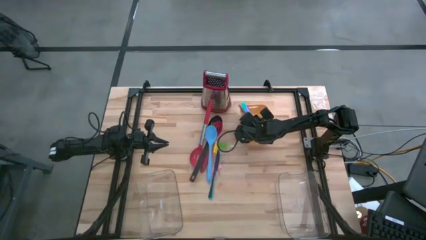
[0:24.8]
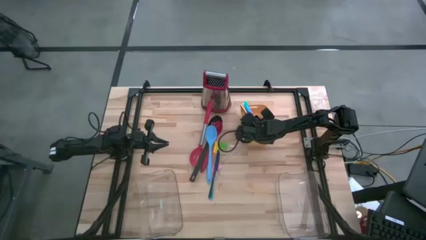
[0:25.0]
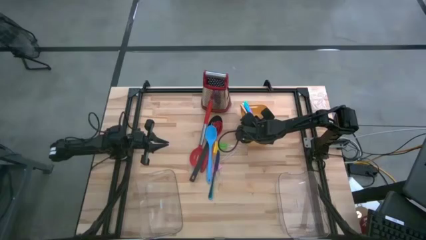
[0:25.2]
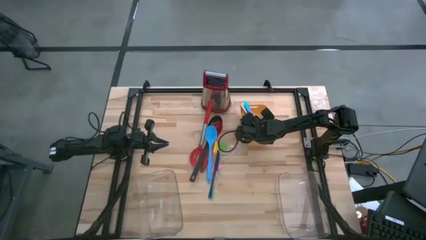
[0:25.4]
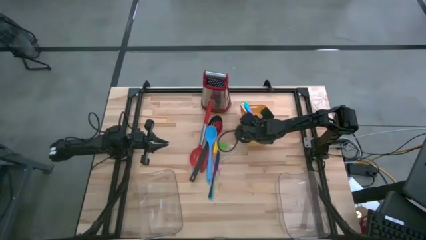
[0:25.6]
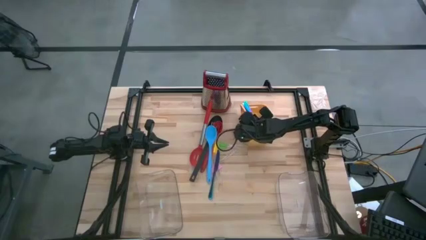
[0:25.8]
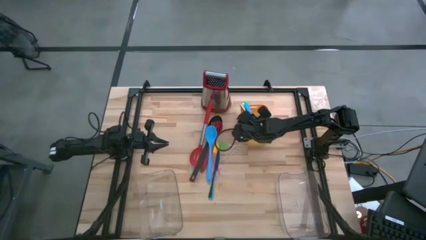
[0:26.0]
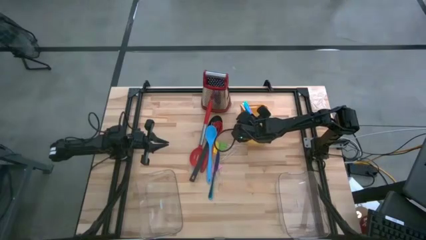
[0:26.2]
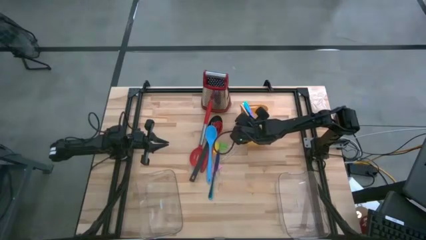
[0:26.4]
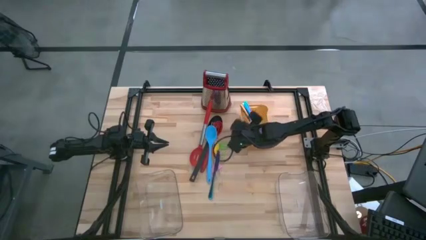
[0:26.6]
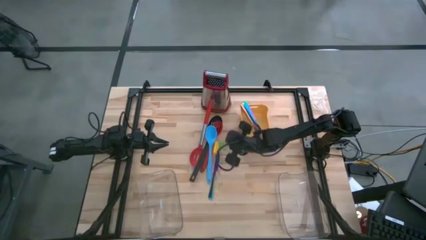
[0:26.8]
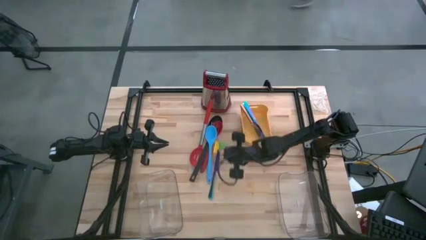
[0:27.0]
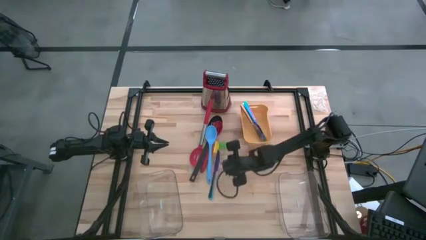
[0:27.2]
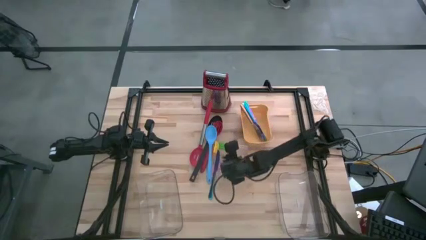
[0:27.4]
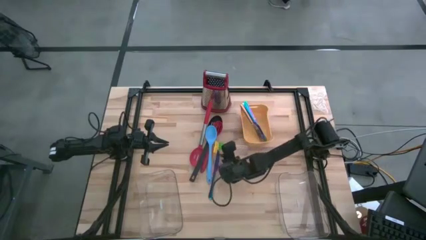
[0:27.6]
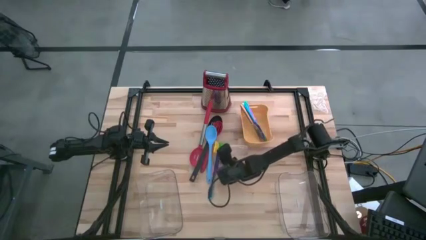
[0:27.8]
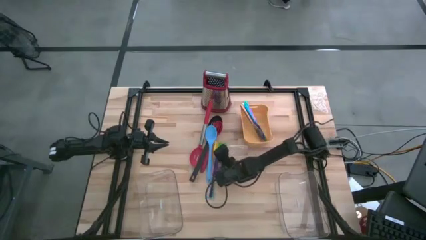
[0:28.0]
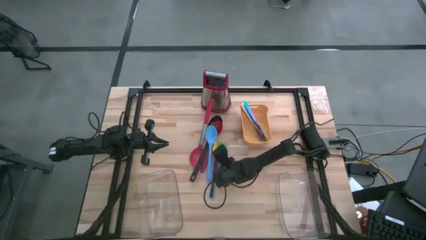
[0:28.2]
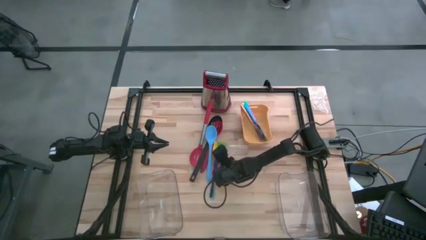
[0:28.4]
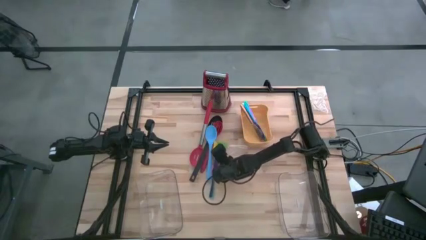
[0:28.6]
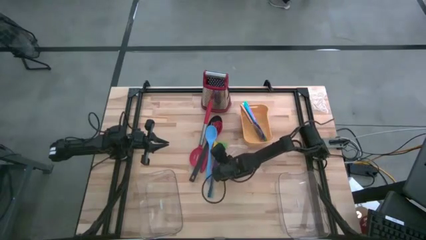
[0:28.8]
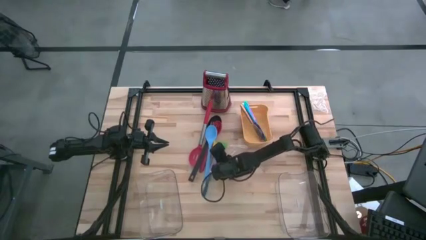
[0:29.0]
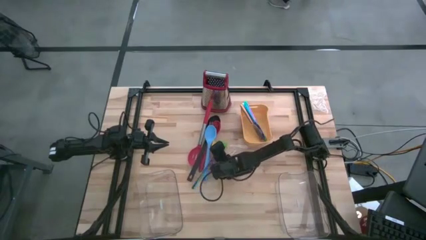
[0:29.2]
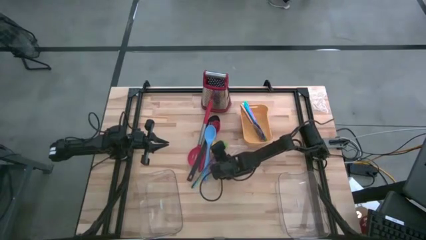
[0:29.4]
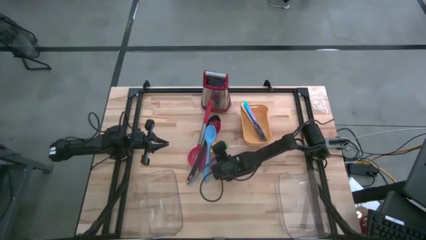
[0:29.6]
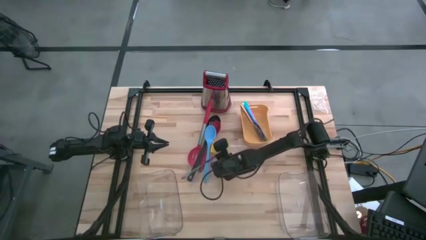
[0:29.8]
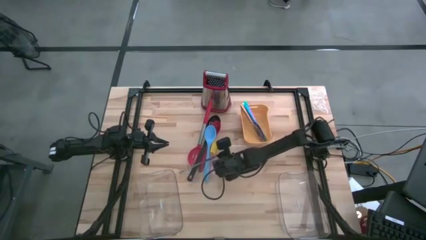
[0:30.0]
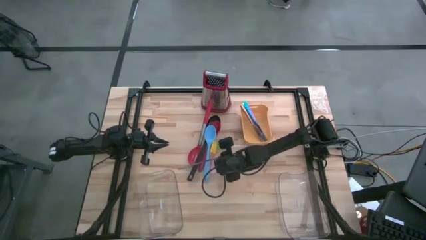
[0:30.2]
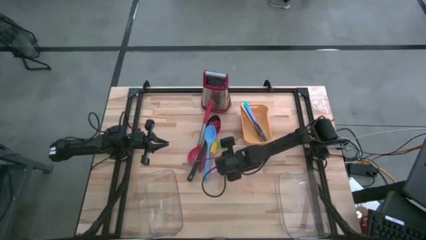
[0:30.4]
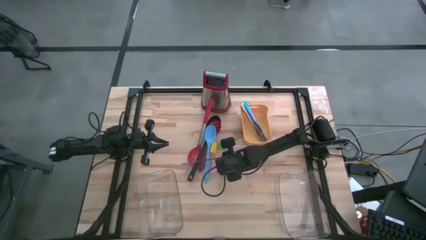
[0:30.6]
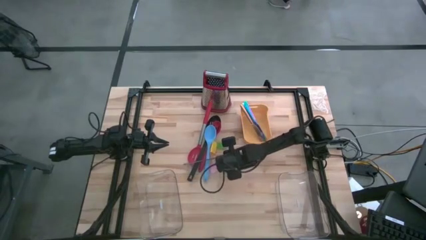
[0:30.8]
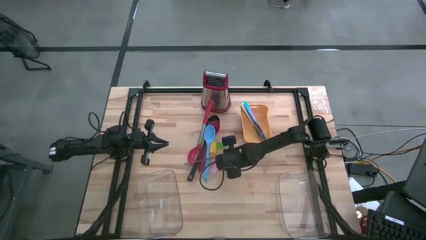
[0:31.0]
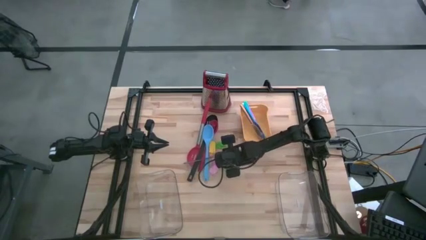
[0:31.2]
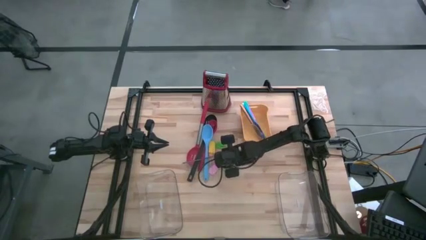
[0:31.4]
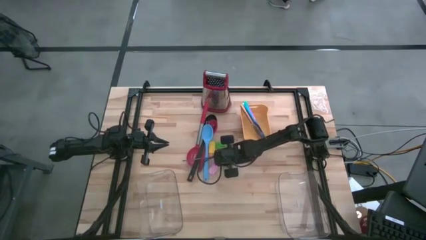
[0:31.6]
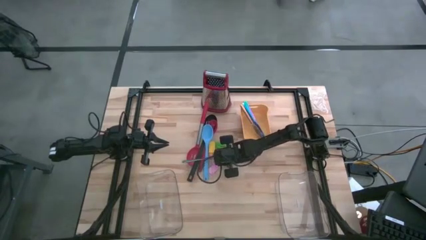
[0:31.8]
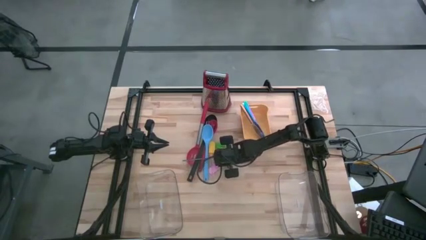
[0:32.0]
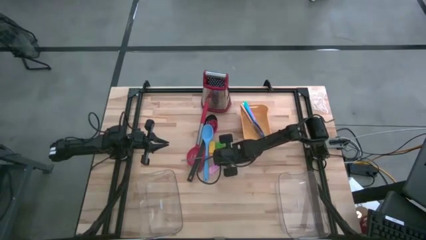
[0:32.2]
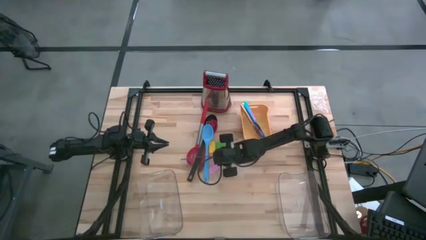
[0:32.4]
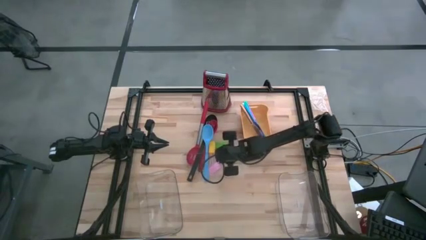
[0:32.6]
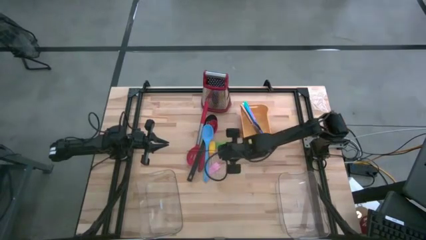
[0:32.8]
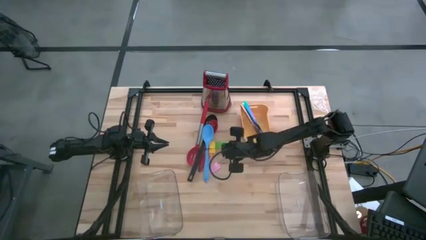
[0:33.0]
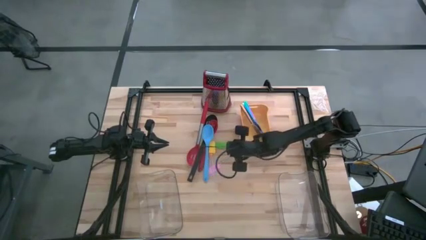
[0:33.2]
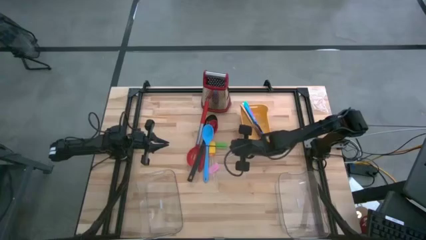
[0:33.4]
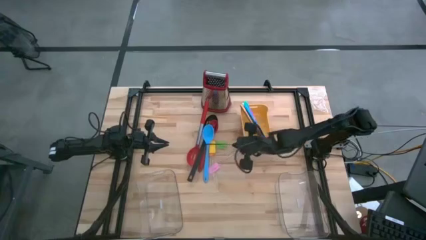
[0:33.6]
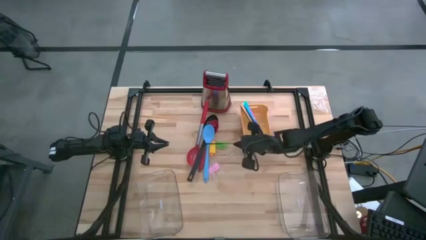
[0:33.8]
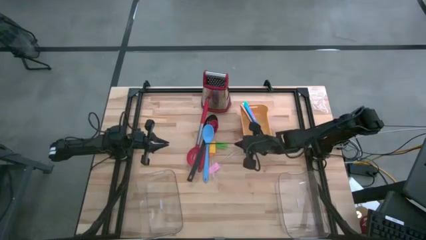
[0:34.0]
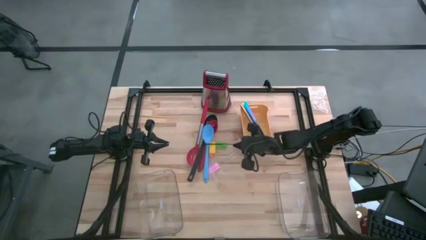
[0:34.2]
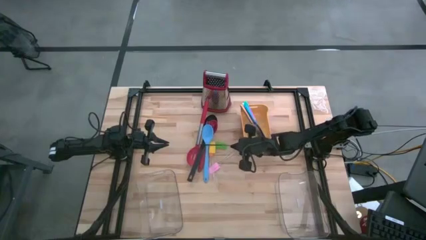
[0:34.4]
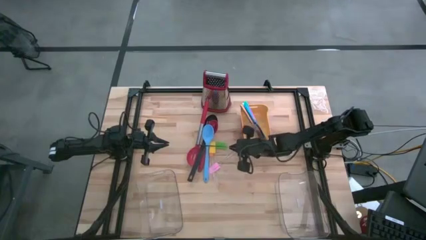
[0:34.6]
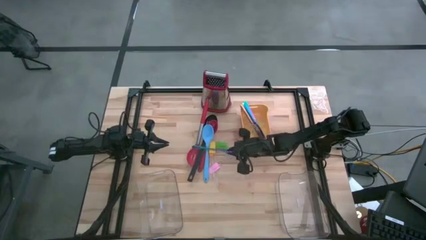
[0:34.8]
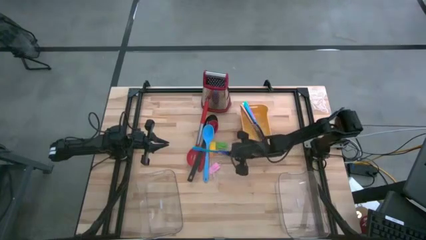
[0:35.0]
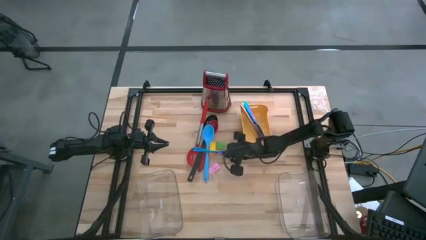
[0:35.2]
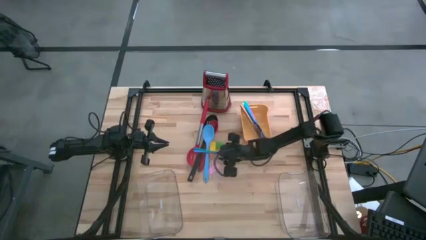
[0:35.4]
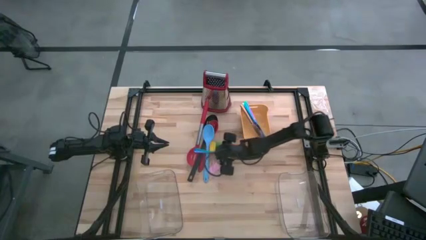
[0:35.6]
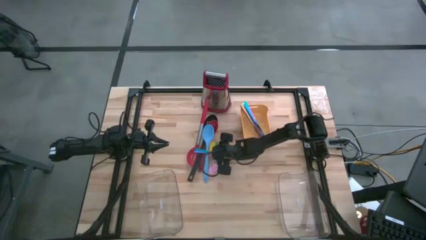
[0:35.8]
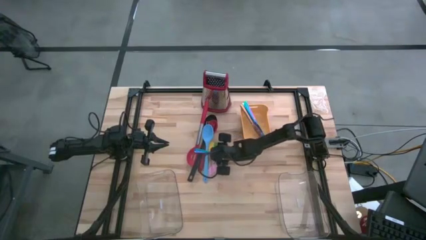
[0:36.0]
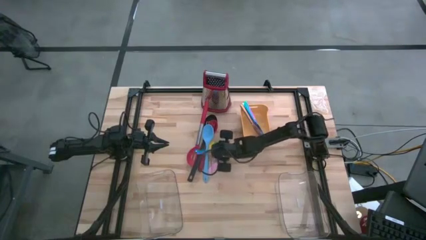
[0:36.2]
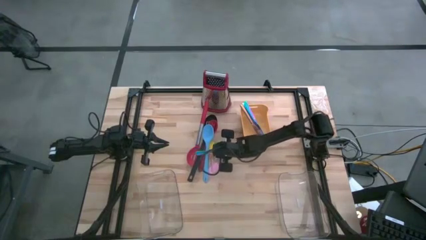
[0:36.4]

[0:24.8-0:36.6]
Task: Pick & Place Kitchen Items
Put the blue table knife into the yellow bin

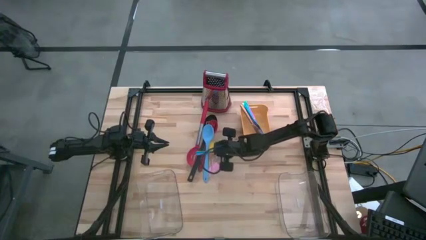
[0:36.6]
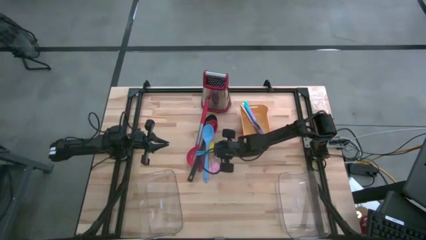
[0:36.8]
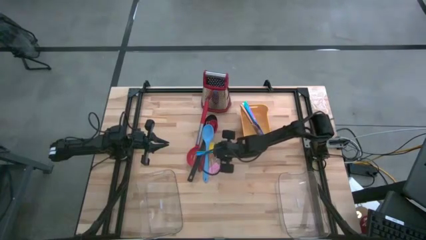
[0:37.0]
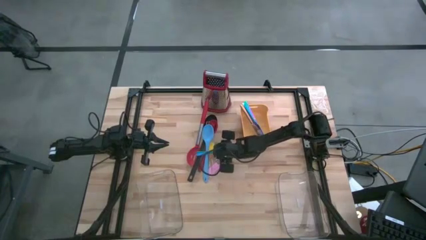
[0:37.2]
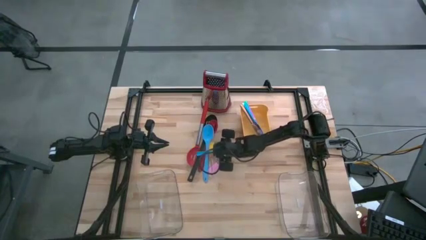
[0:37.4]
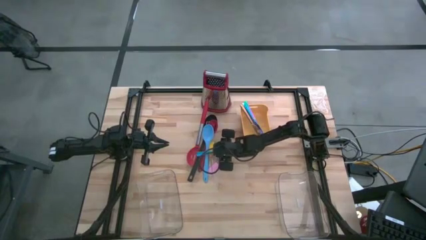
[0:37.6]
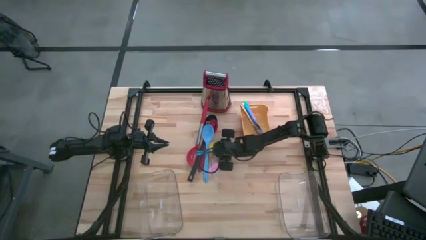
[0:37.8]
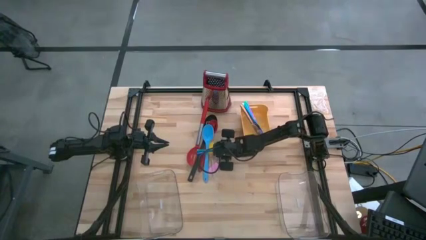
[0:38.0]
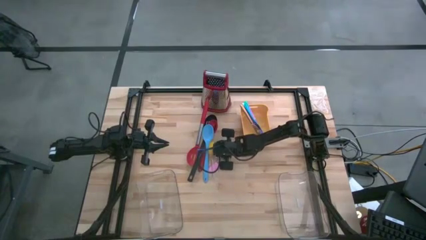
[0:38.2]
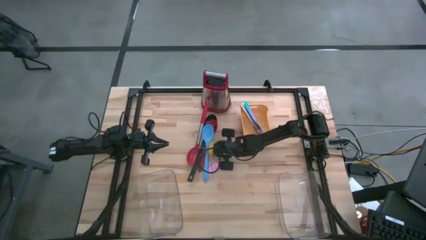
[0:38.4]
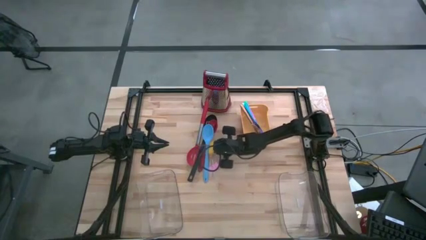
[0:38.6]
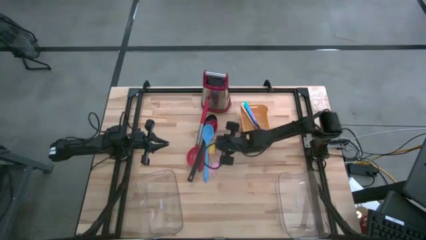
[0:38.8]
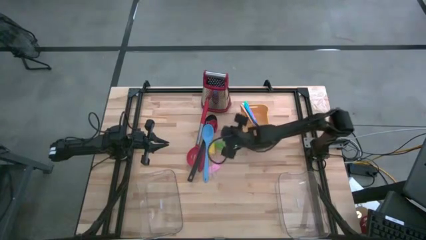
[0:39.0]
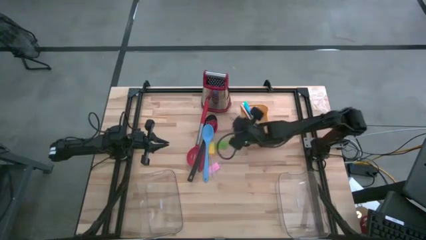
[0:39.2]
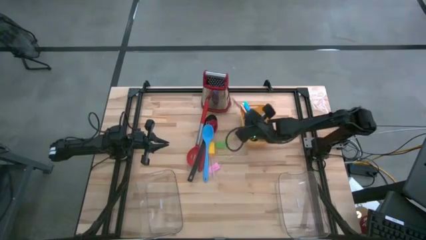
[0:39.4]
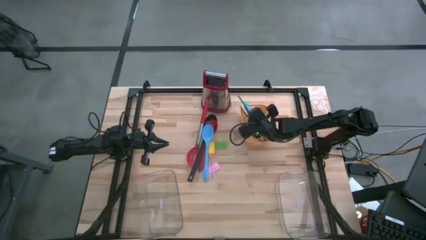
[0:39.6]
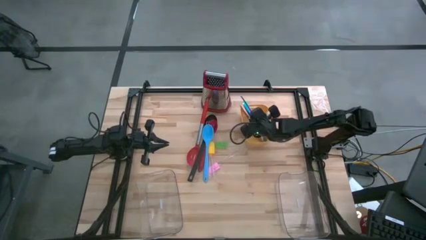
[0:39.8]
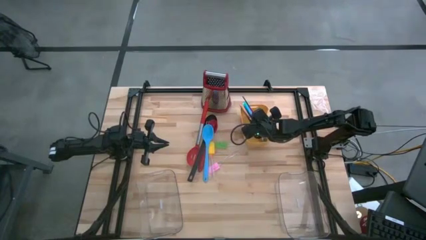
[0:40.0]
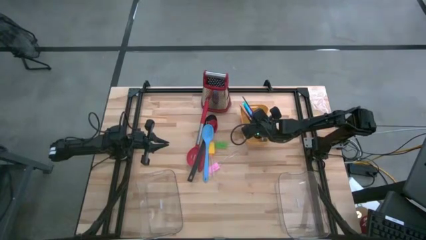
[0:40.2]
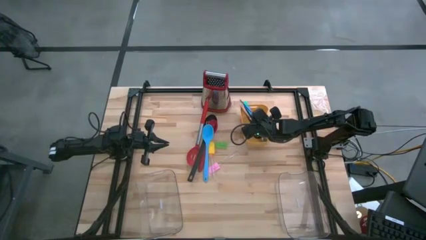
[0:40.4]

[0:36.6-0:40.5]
Put the blue table knife into the yellow bin
